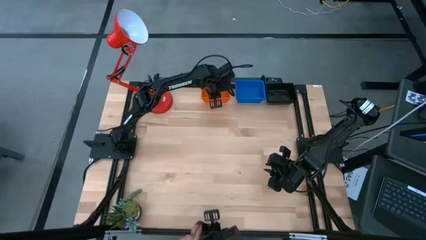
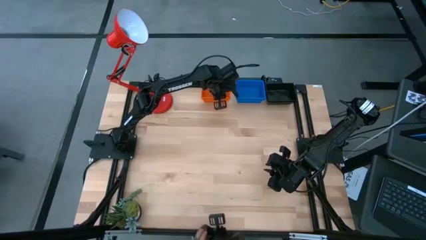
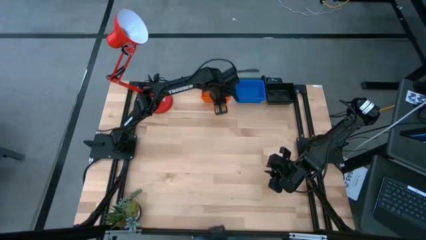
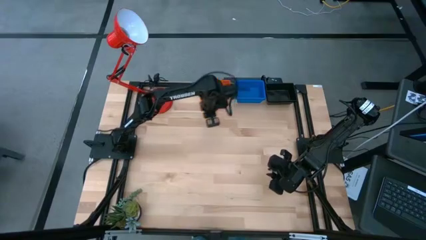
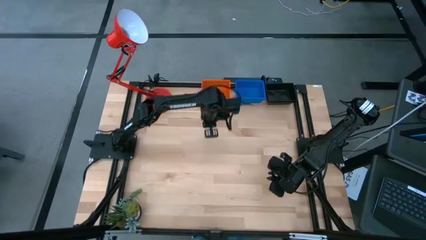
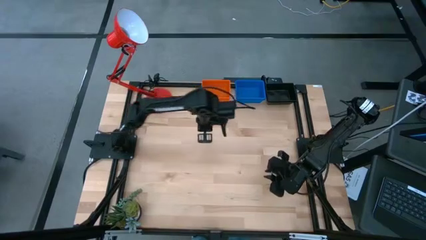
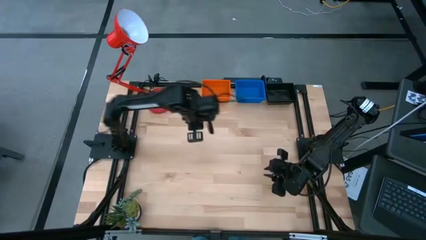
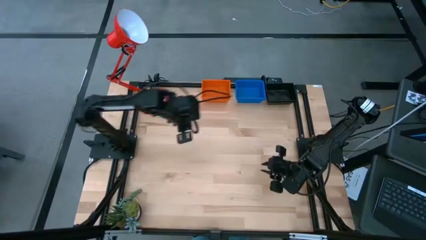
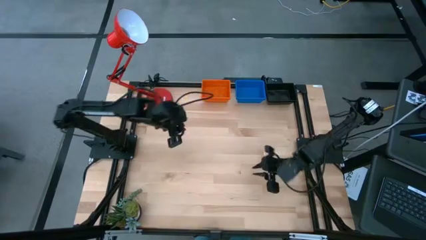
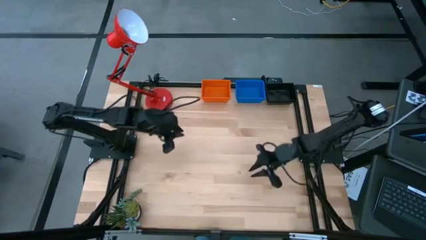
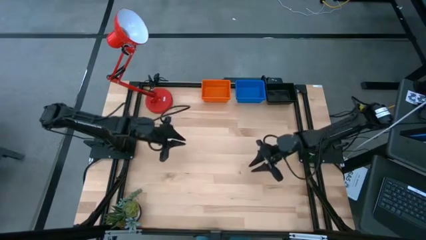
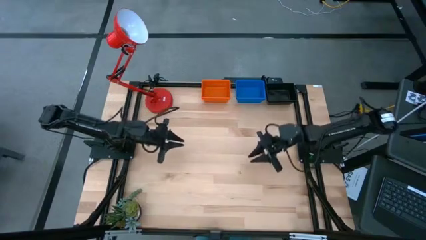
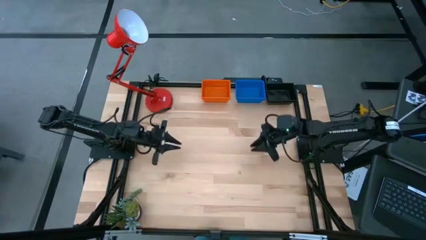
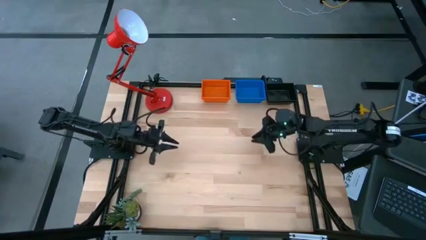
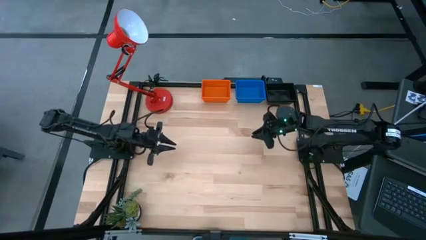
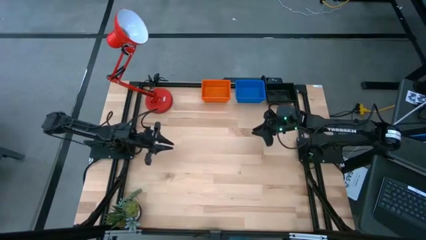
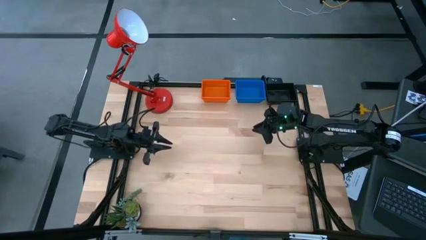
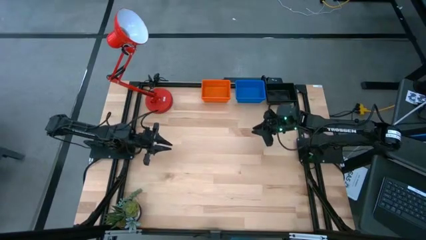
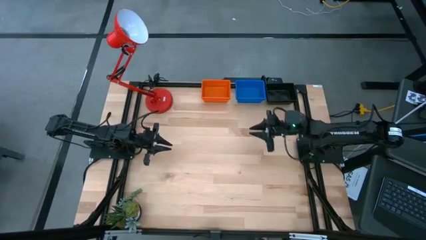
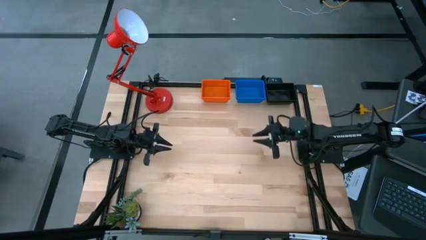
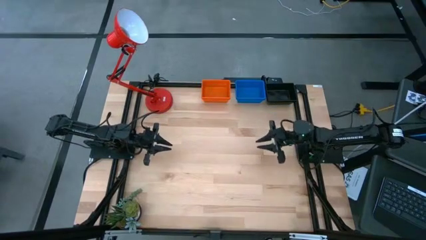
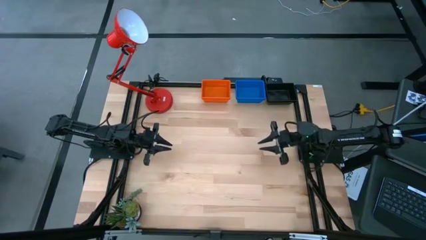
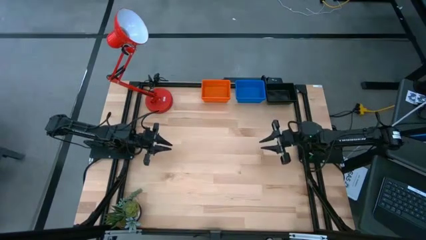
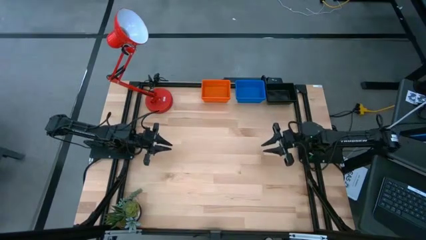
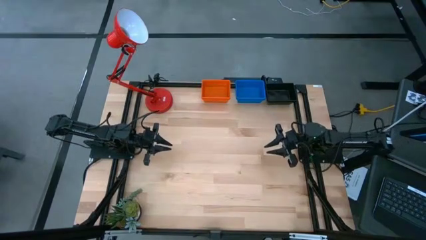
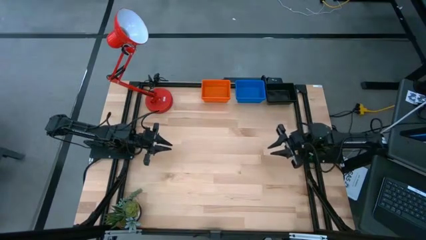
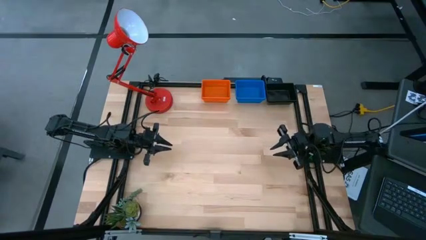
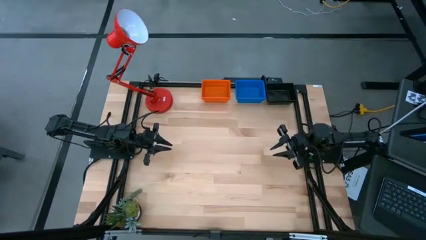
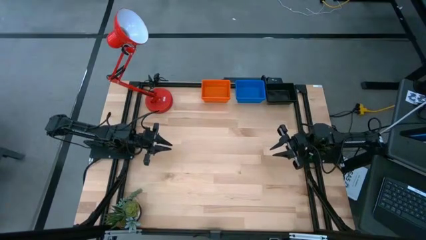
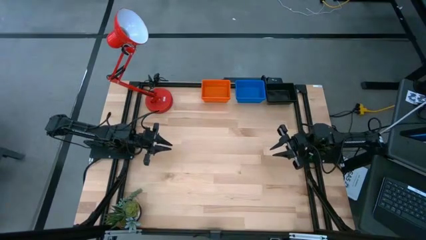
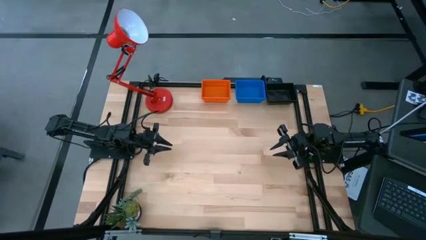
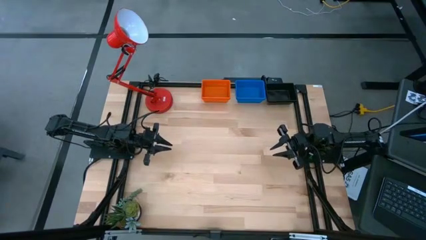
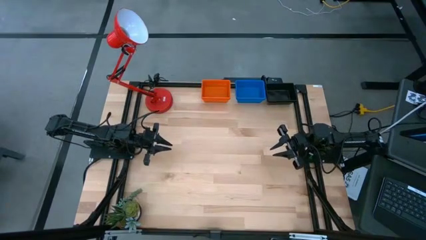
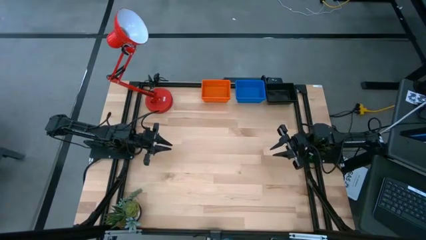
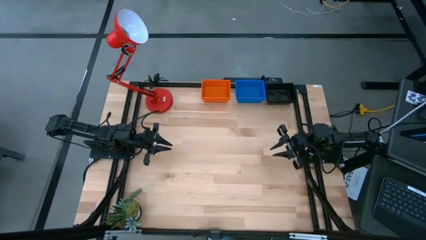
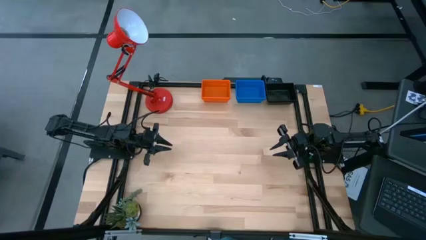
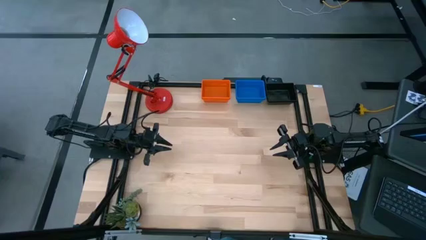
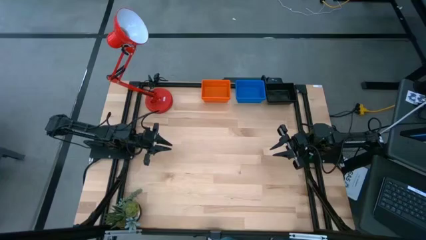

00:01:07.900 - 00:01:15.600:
Return to Home Position

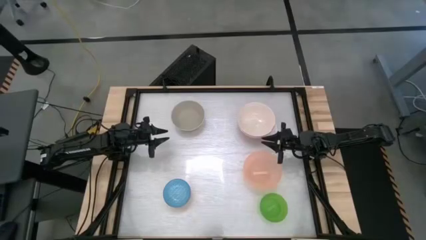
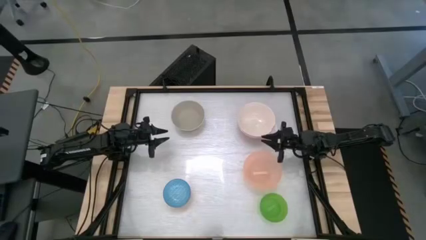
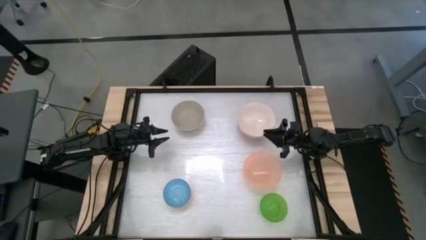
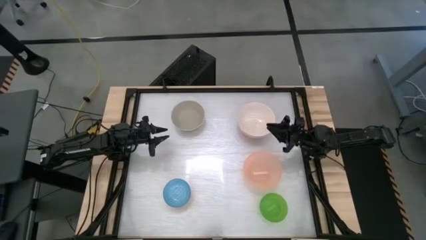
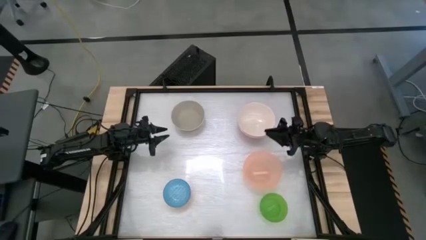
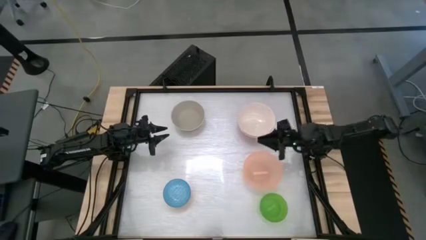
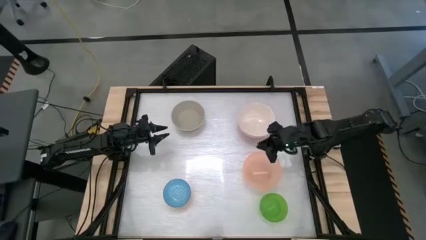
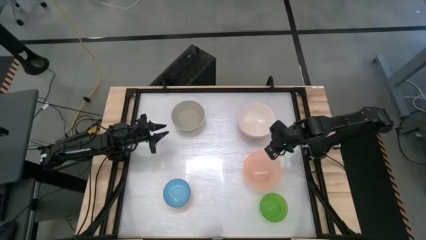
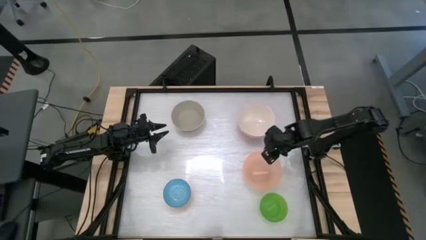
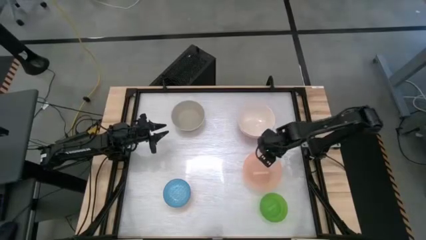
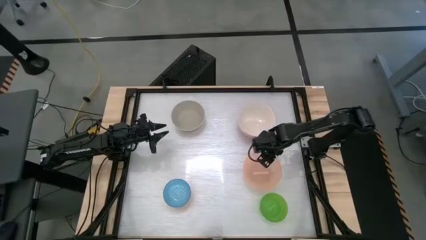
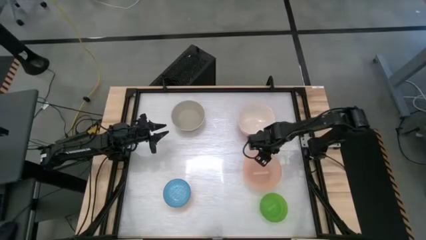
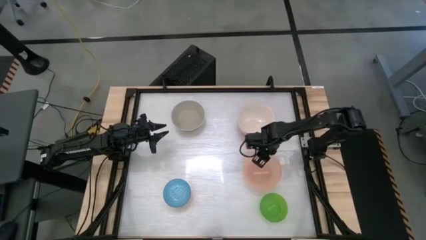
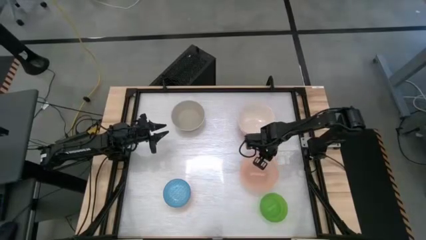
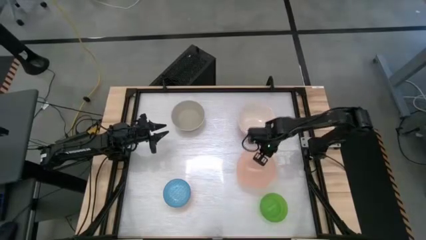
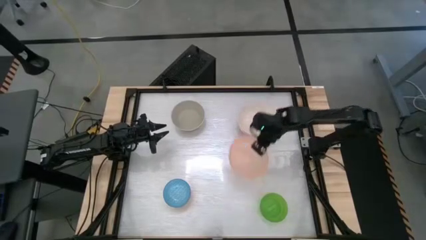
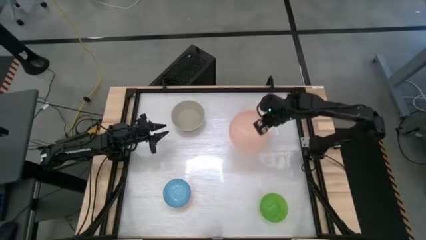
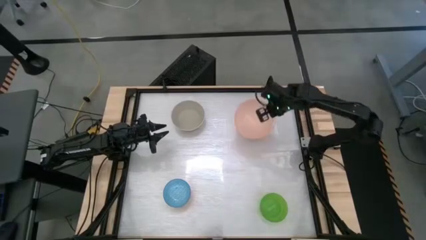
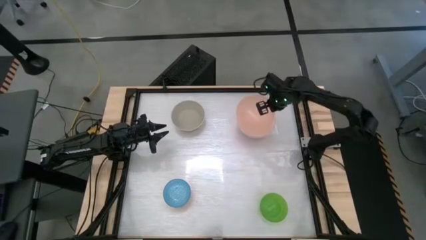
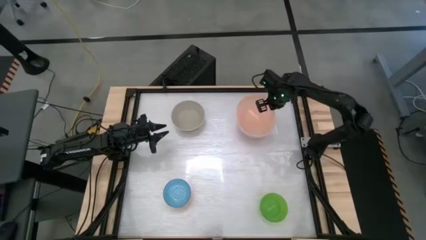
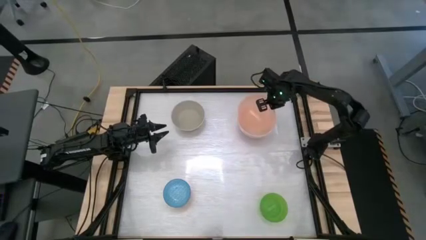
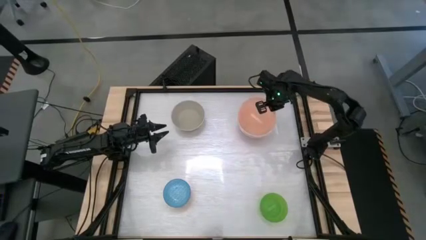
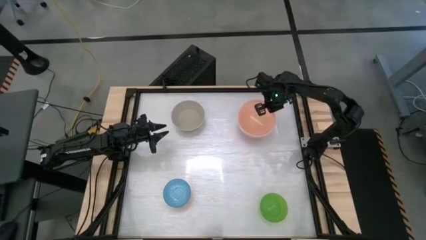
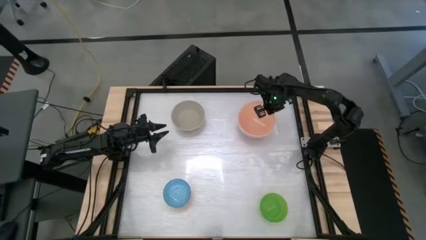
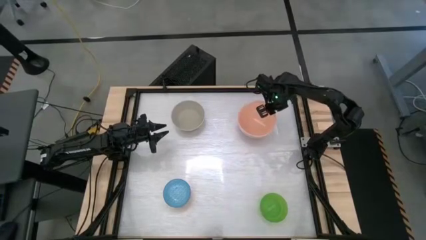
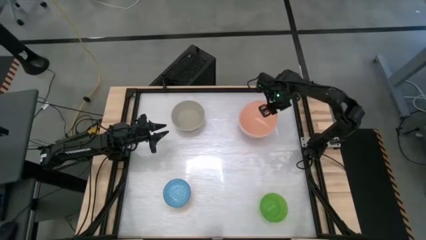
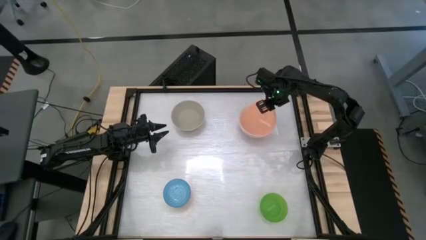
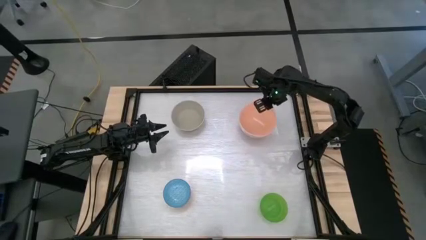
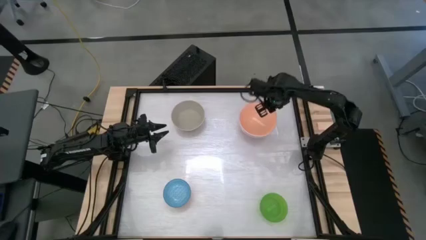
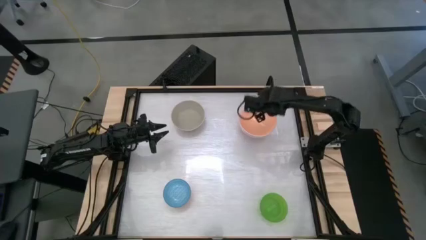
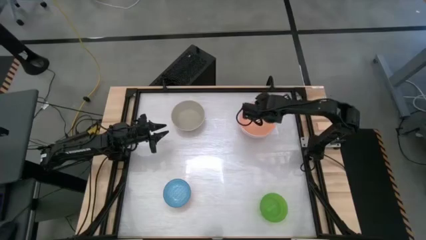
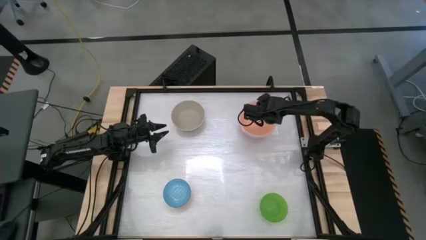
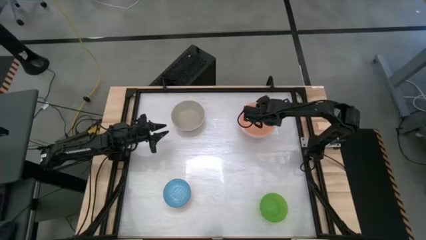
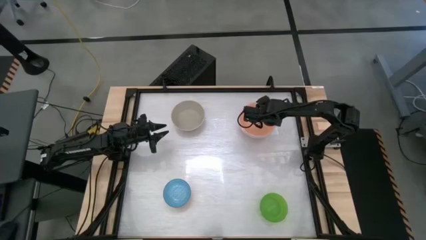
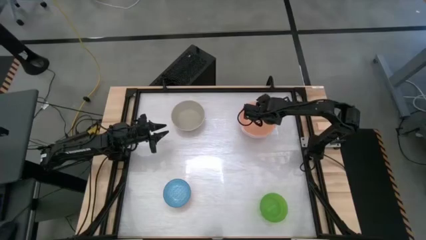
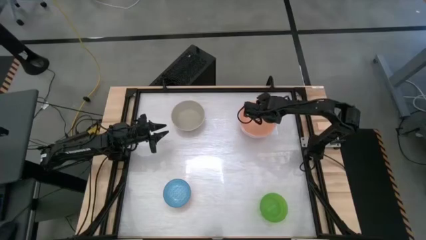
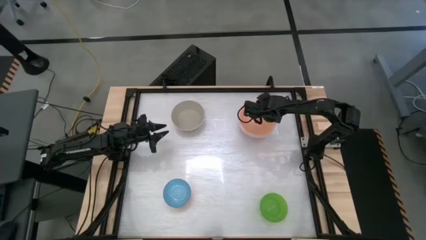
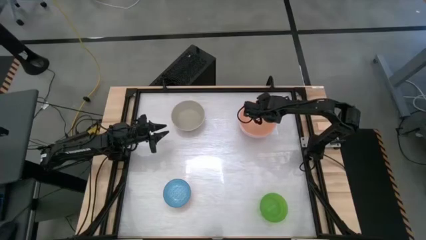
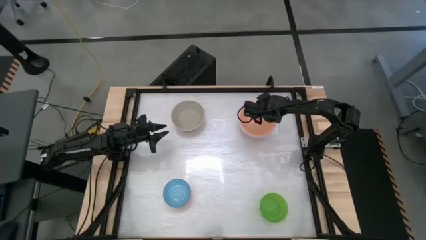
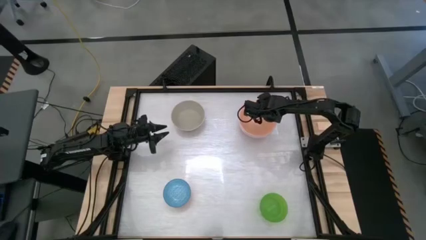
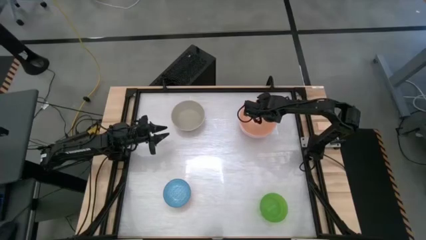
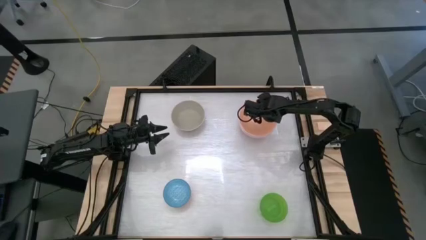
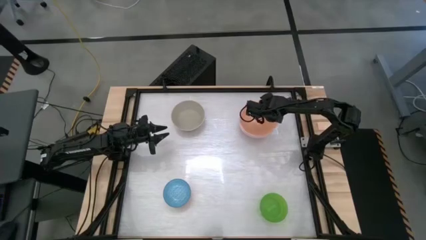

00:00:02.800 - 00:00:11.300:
Stack the beige bowl on top of the white bowl
